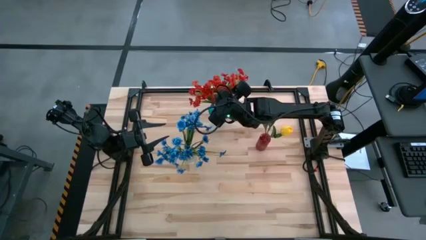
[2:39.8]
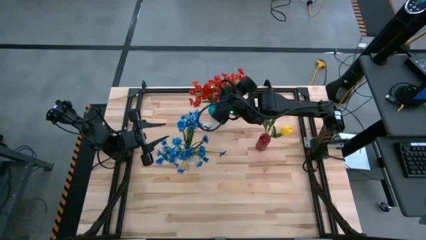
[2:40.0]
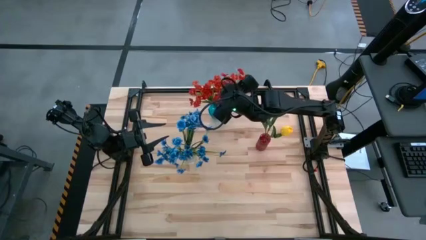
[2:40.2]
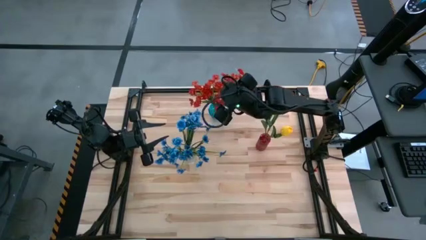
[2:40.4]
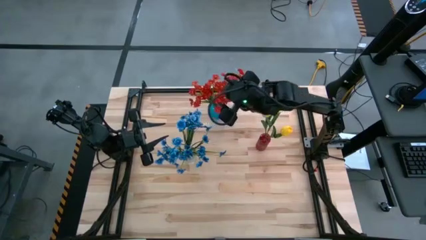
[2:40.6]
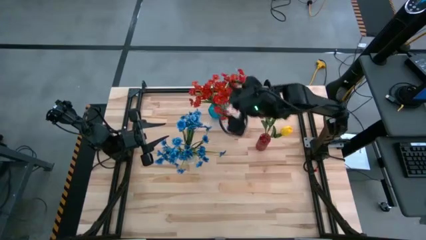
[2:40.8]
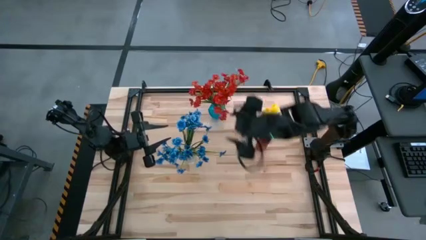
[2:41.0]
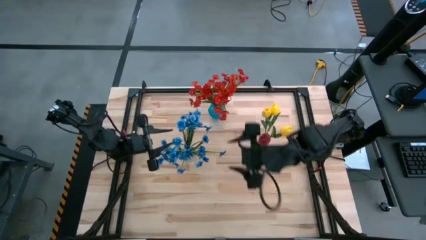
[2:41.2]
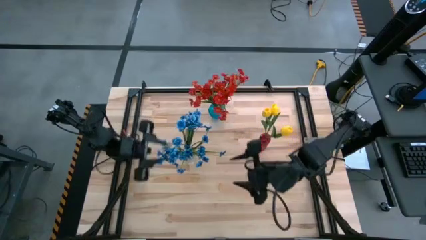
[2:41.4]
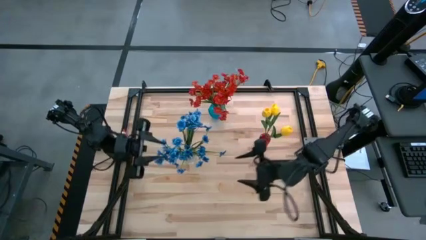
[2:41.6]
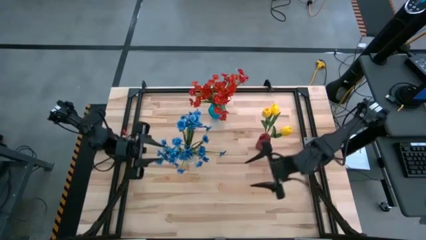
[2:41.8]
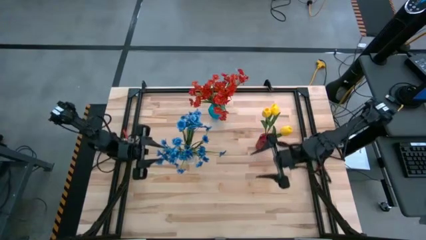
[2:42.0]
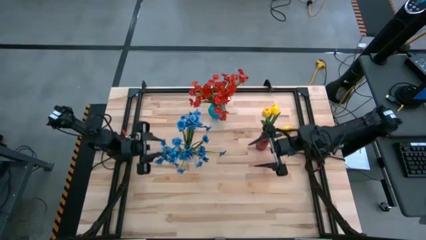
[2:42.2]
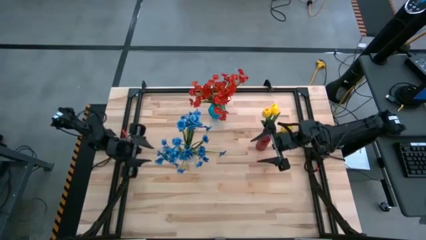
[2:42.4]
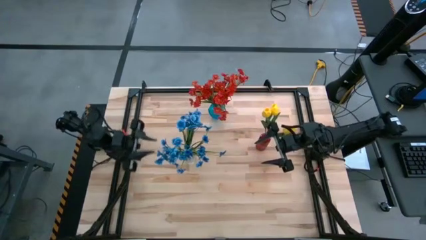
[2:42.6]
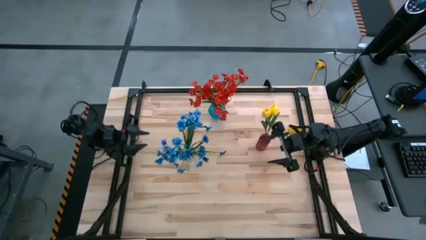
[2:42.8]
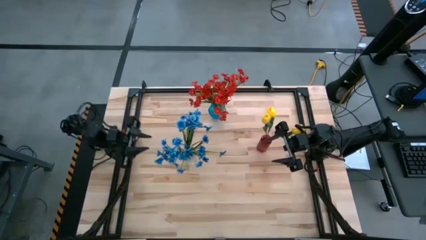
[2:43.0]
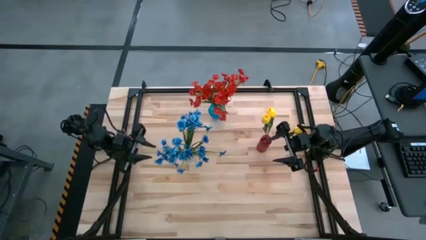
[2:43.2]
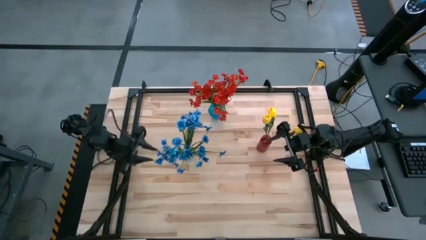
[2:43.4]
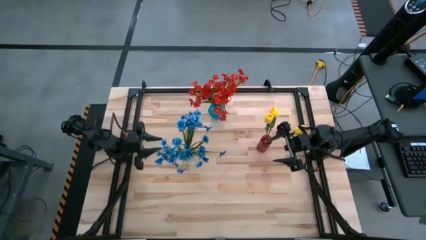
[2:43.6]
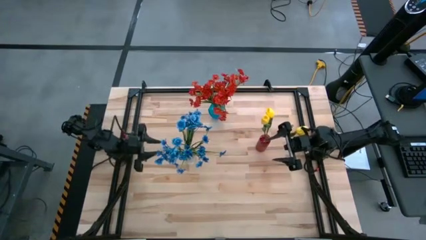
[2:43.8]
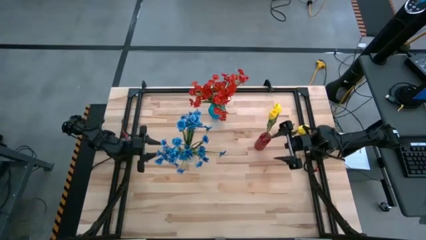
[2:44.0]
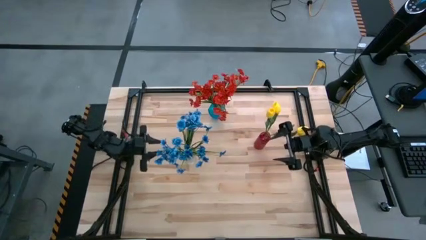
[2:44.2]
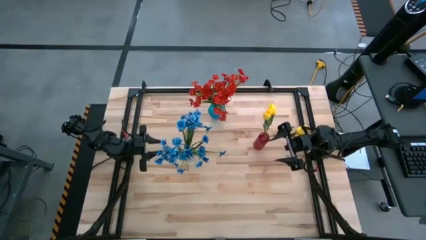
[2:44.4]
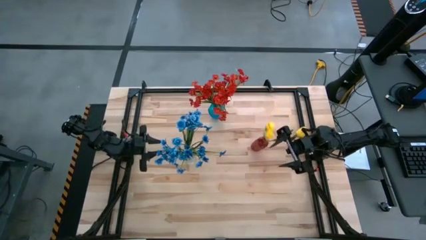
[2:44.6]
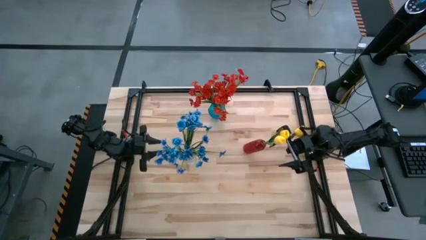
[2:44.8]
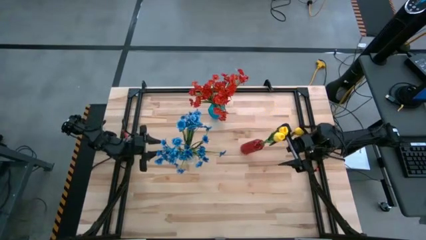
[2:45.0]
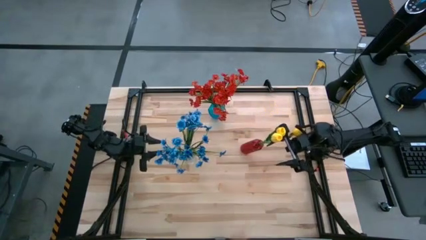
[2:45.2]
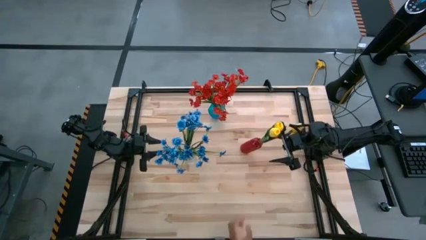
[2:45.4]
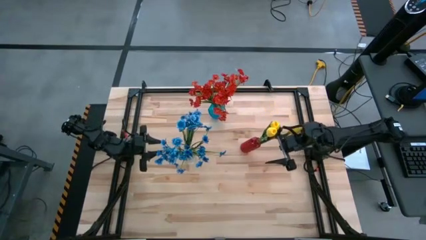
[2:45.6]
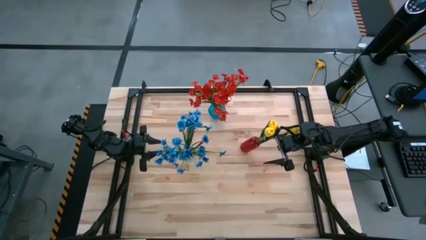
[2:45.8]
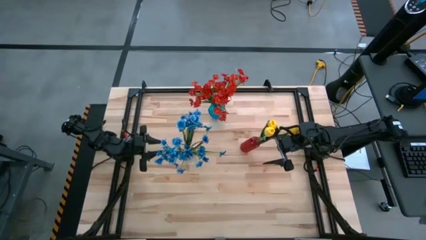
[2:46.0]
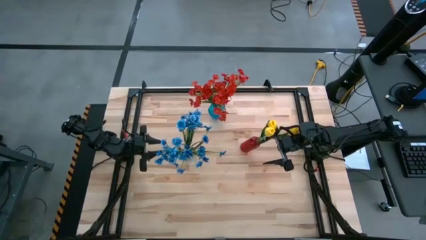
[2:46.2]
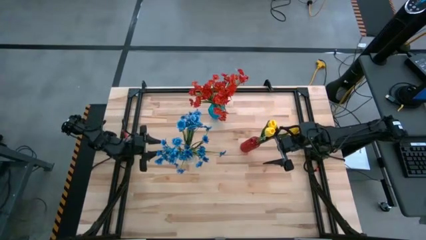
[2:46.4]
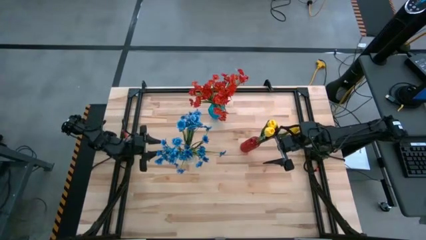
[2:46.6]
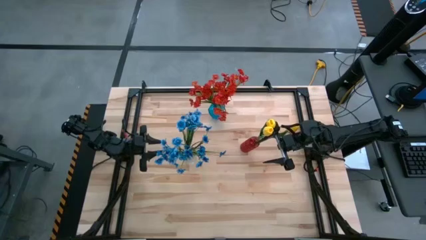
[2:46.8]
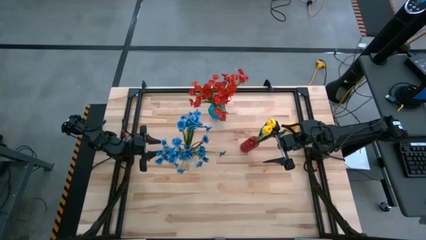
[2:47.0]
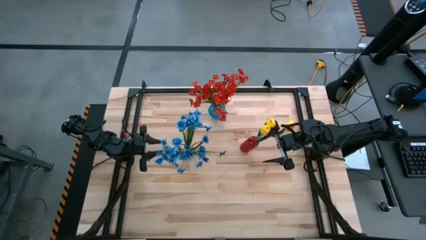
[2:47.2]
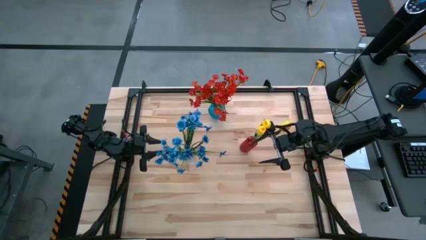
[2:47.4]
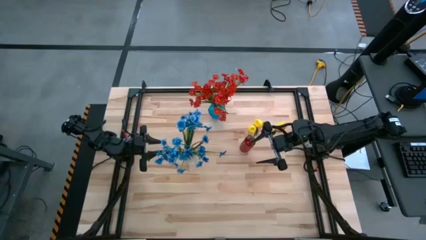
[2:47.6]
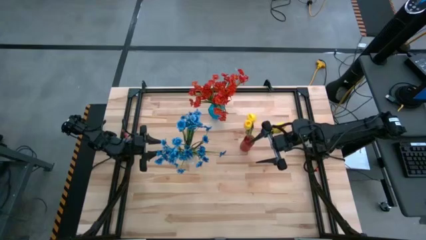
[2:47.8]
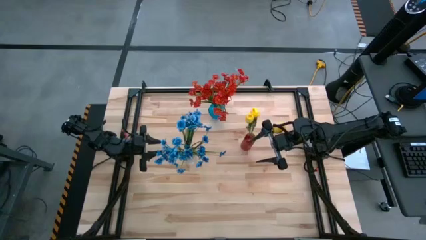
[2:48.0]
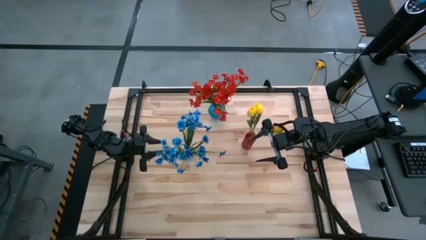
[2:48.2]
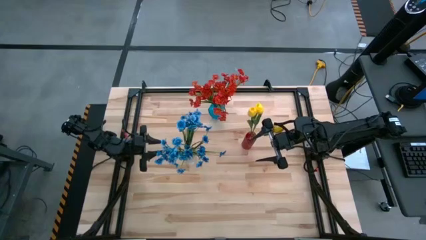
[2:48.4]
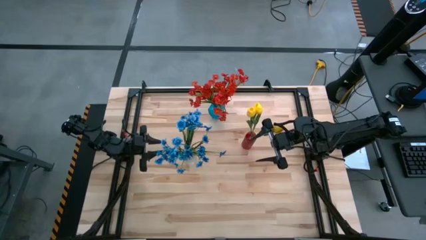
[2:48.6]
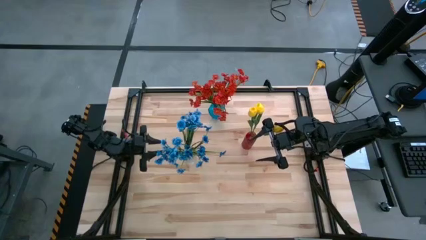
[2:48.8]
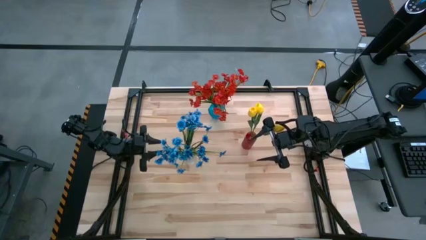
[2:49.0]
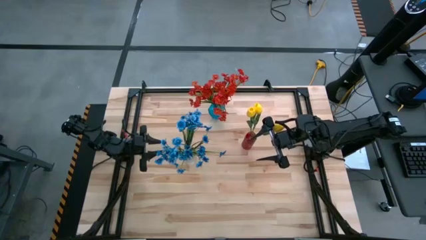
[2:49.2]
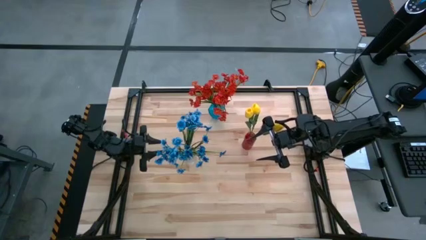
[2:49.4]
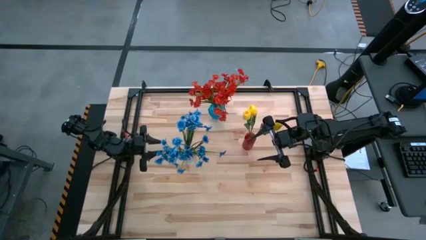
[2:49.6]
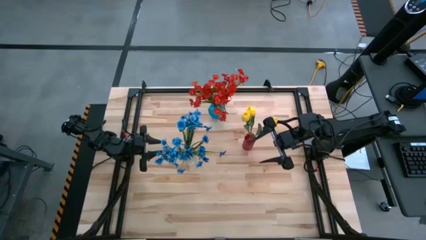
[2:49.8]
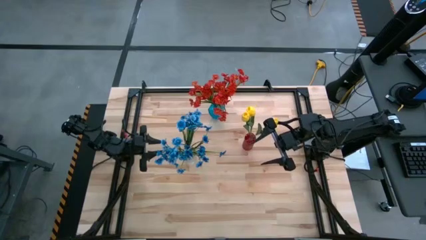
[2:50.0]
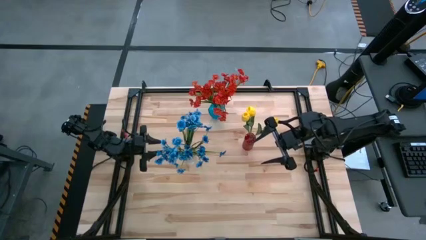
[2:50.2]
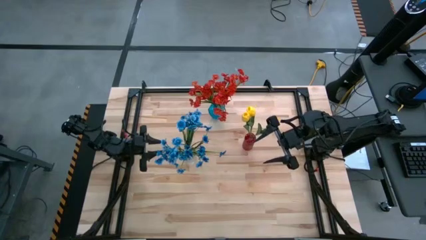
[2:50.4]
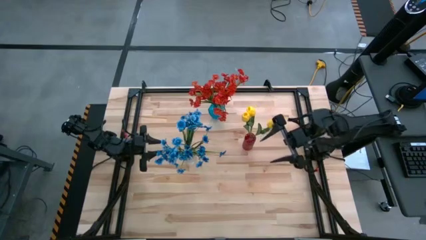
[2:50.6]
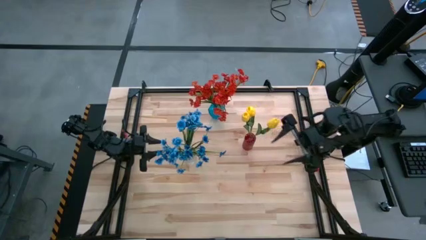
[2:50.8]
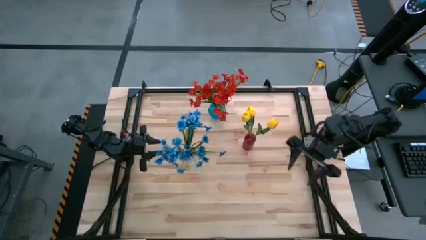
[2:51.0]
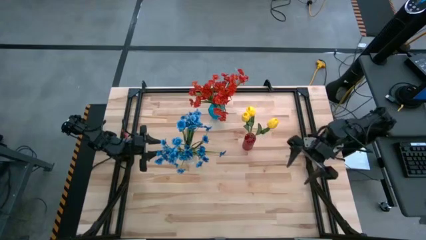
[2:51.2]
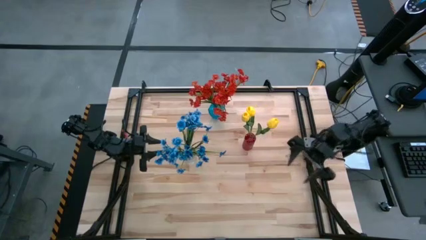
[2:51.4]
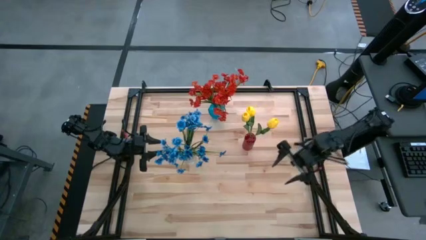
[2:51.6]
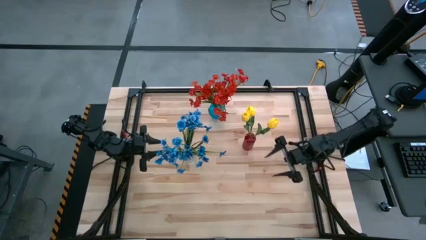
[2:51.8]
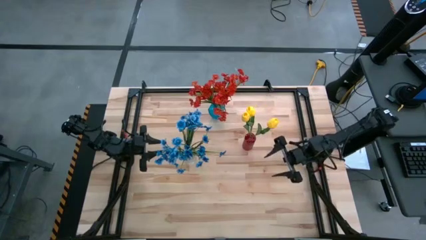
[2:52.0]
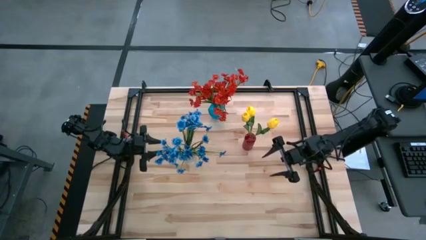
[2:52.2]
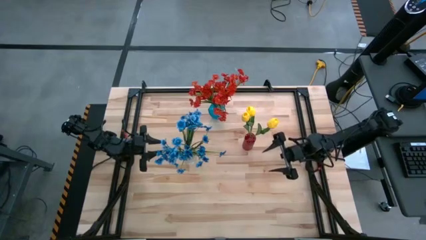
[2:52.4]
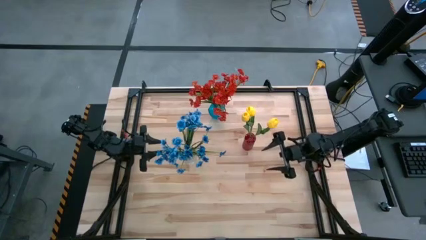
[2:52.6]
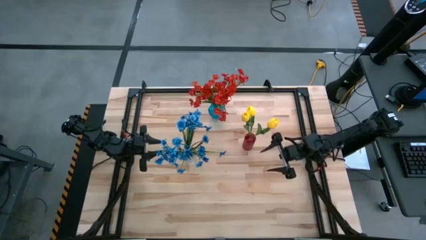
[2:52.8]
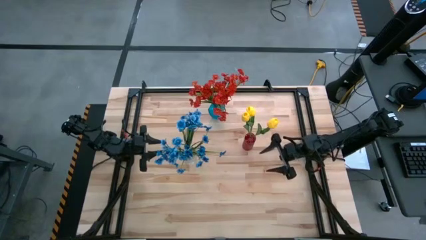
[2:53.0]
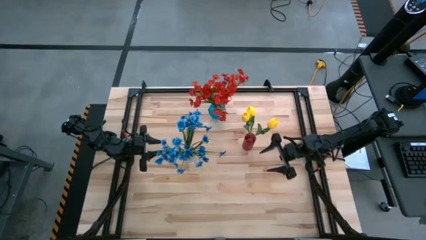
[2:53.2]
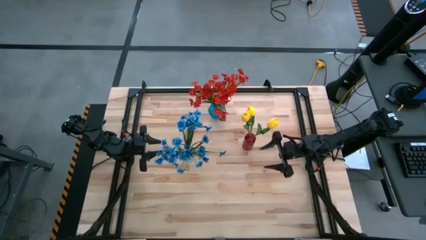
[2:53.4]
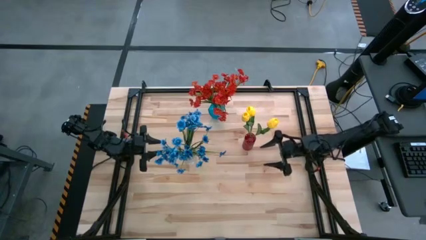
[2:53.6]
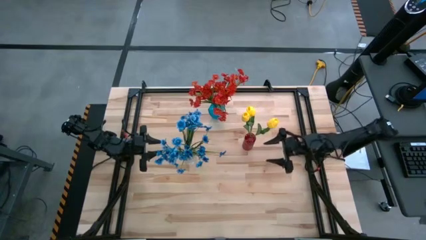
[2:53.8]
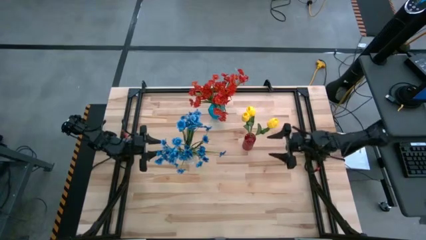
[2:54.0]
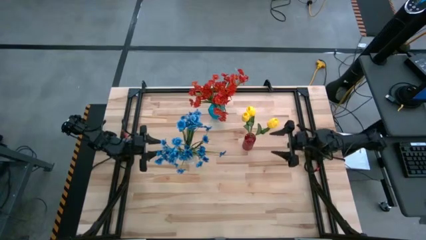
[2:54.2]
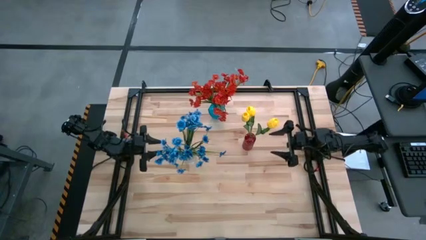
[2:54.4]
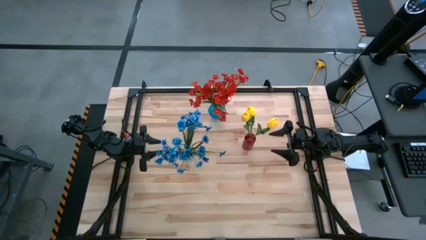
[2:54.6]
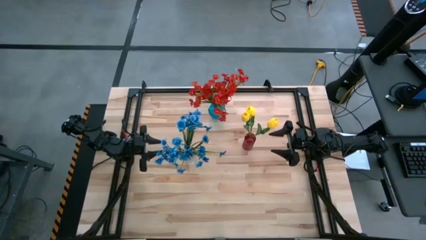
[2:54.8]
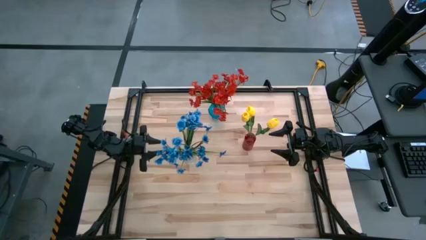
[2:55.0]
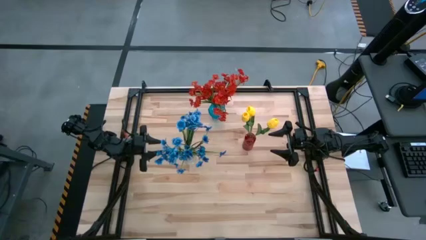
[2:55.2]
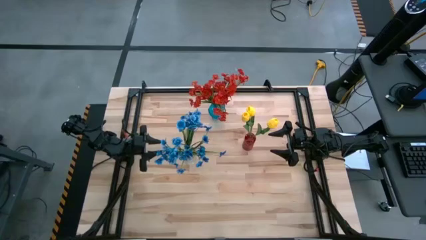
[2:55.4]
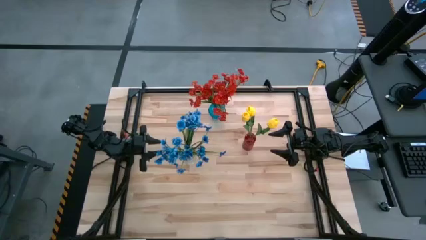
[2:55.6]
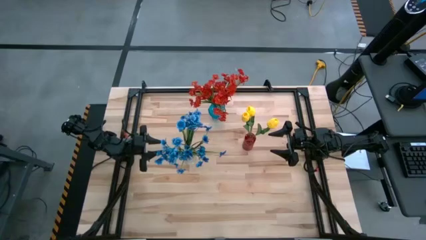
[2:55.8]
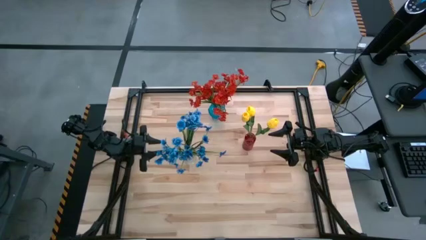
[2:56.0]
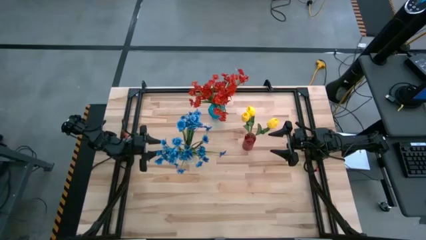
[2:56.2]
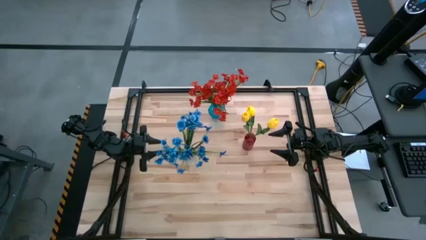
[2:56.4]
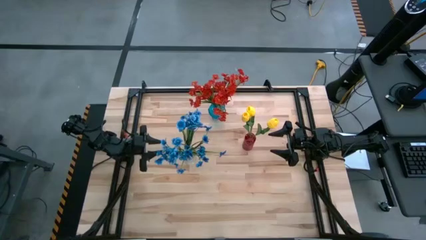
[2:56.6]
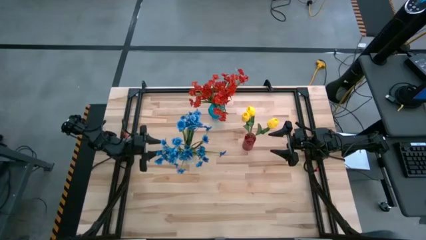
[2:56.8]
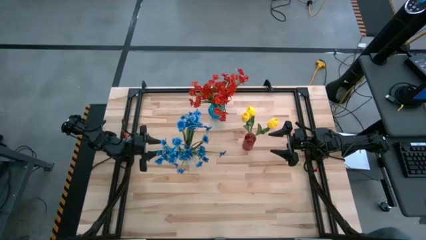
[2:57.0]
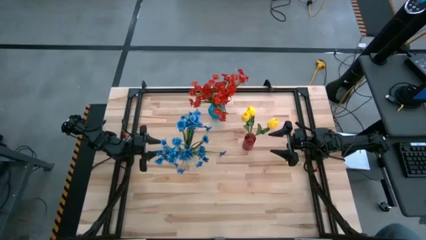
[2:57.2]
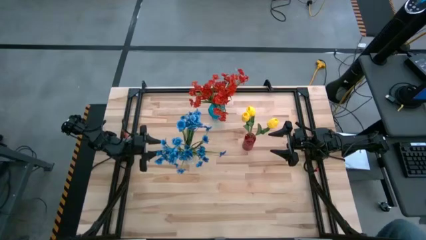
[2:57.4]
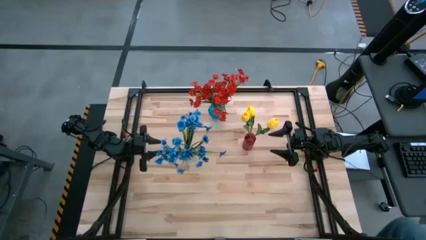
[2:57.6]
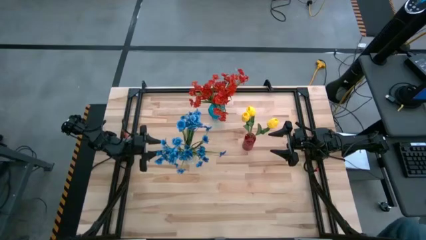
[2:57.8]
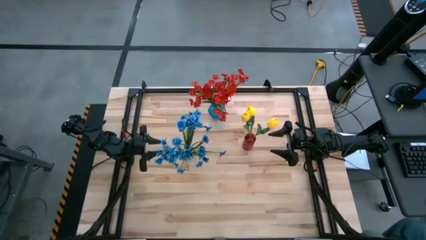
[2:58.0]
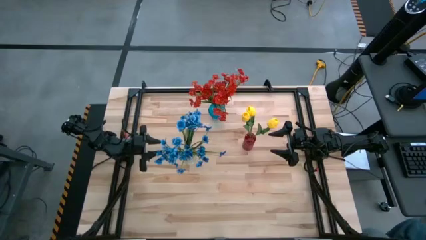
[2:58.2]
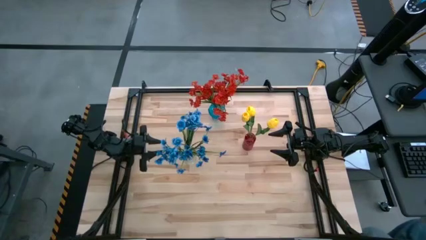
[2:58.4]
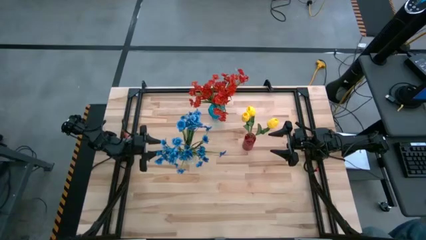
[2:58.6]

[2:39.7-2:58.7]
Task: Sort flowers into vase by color
Return to Home Position
